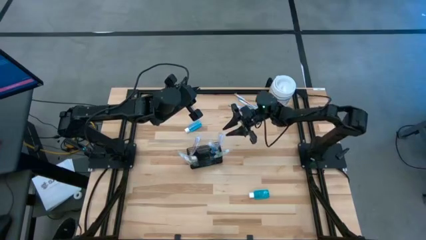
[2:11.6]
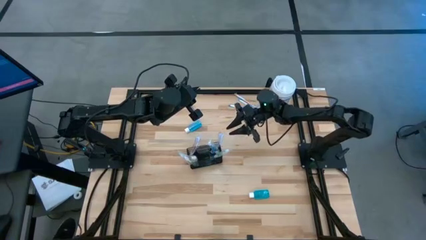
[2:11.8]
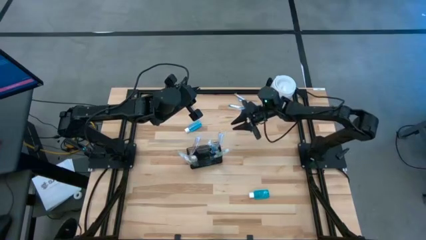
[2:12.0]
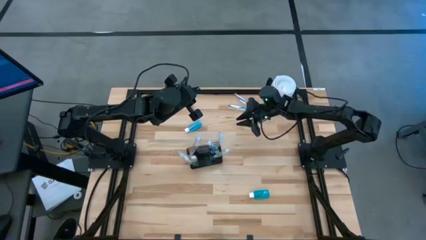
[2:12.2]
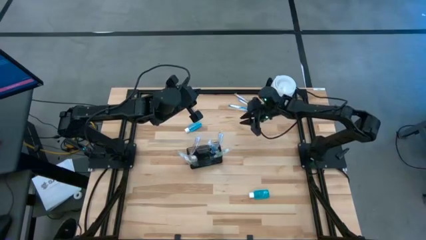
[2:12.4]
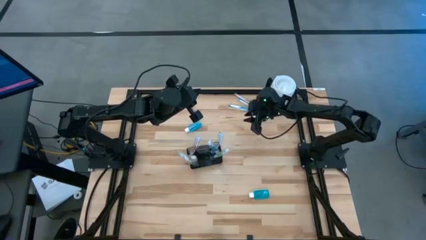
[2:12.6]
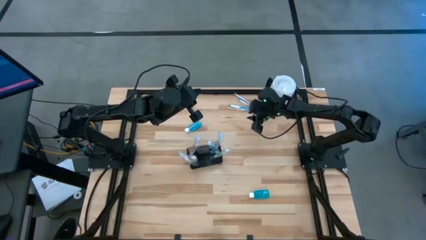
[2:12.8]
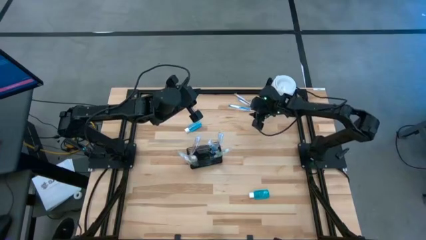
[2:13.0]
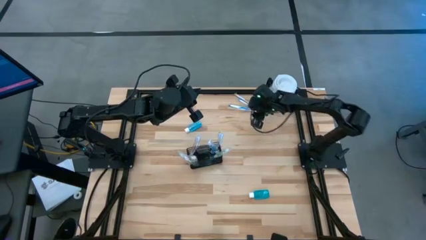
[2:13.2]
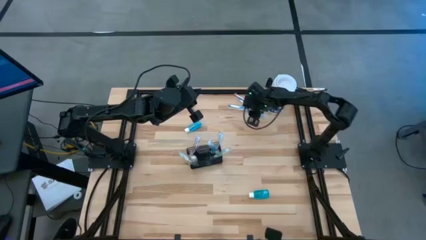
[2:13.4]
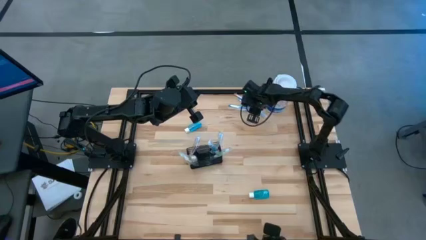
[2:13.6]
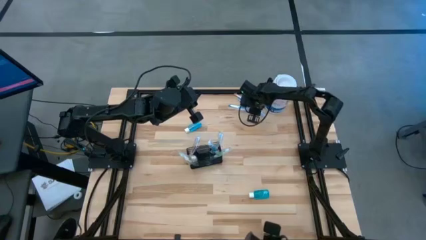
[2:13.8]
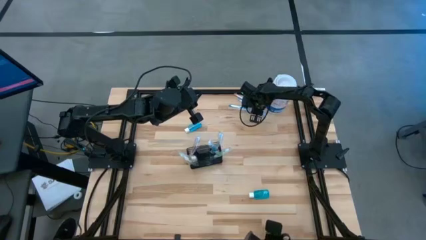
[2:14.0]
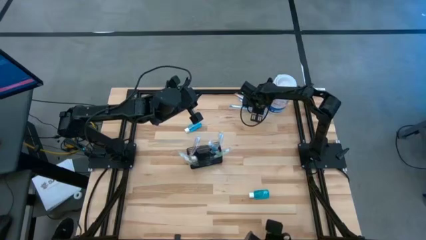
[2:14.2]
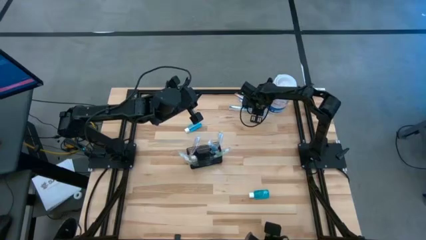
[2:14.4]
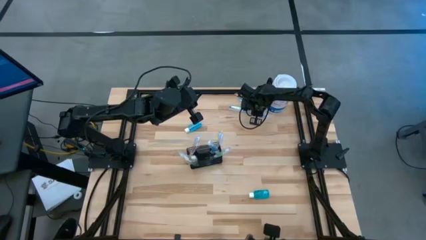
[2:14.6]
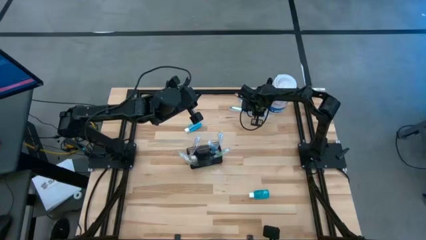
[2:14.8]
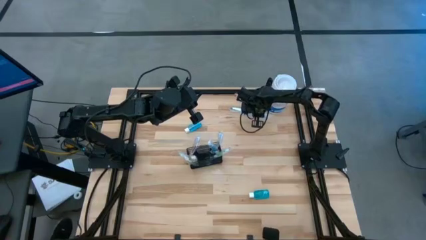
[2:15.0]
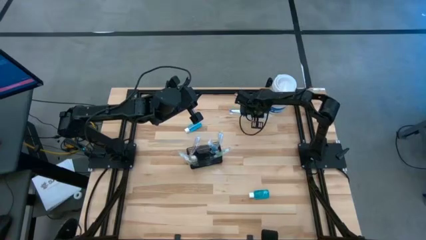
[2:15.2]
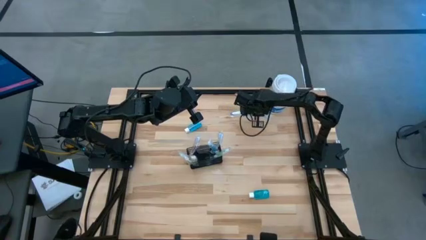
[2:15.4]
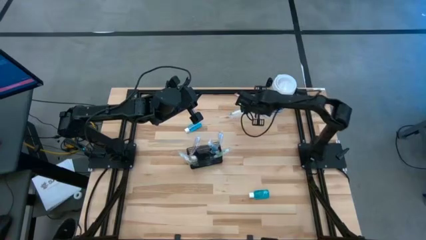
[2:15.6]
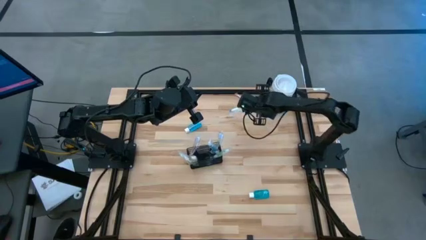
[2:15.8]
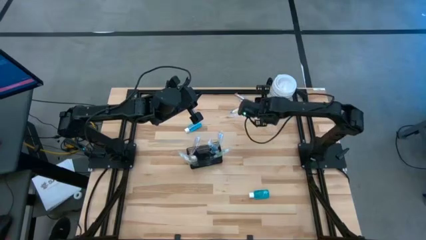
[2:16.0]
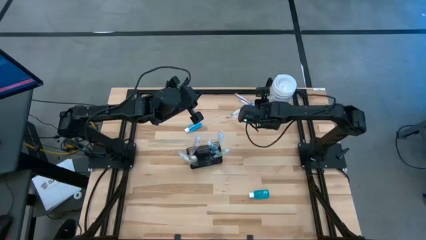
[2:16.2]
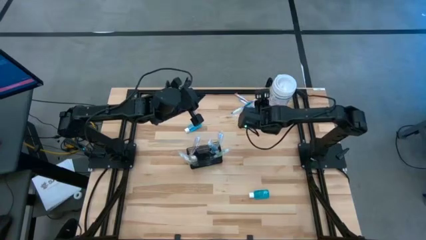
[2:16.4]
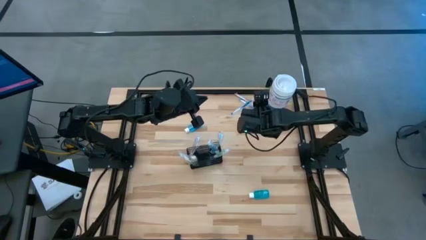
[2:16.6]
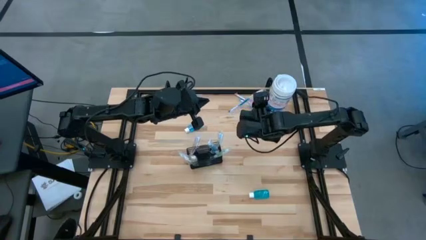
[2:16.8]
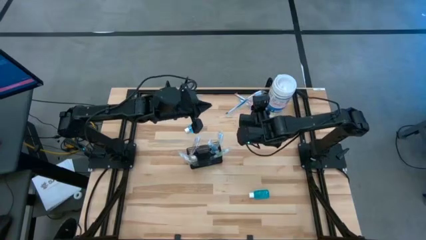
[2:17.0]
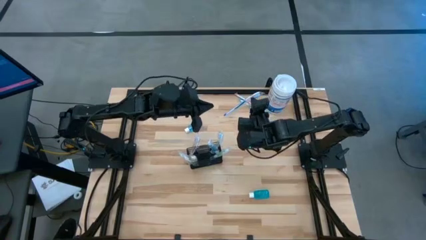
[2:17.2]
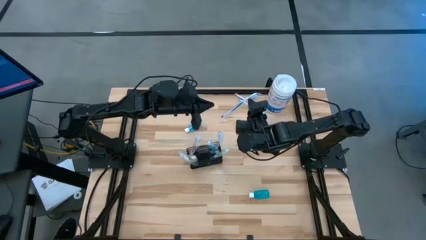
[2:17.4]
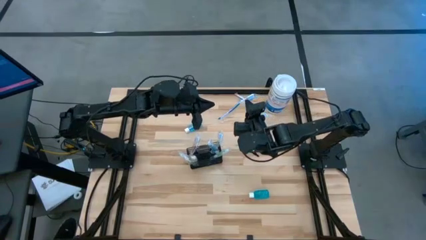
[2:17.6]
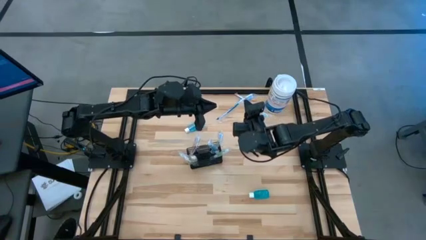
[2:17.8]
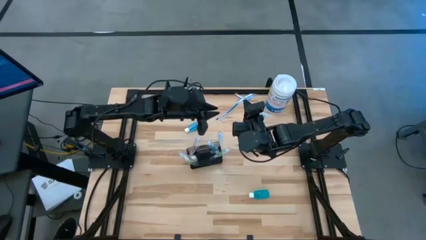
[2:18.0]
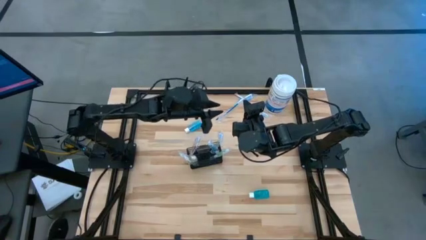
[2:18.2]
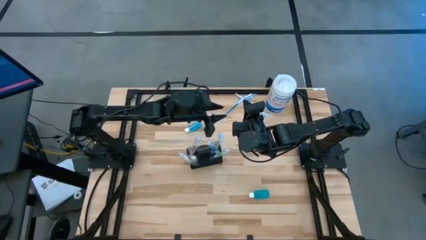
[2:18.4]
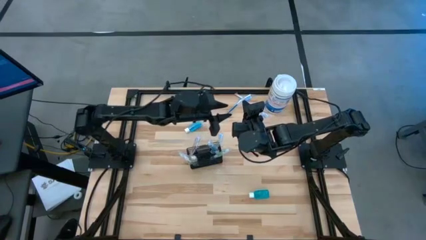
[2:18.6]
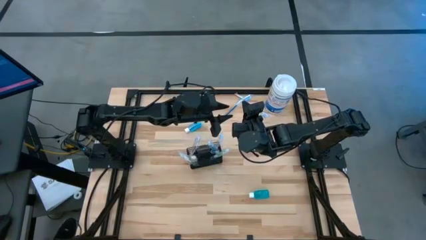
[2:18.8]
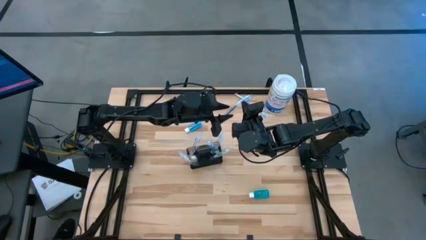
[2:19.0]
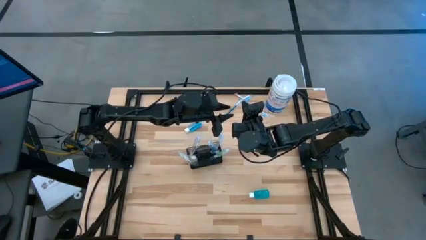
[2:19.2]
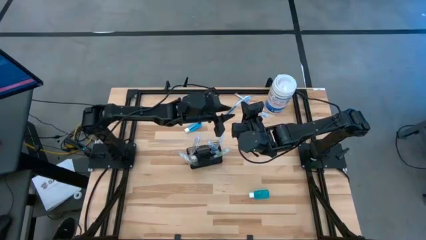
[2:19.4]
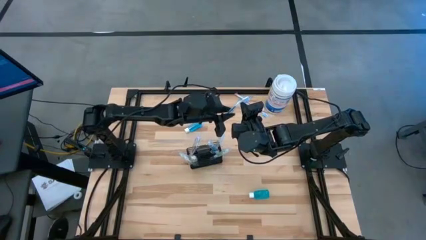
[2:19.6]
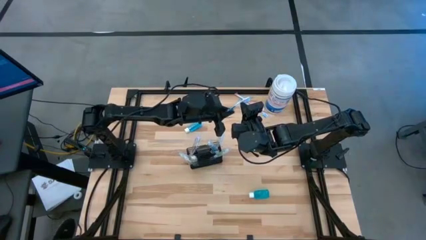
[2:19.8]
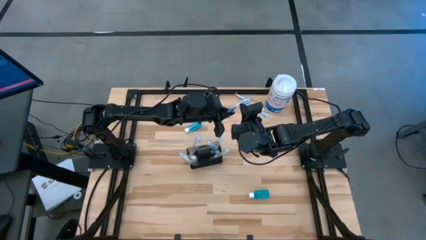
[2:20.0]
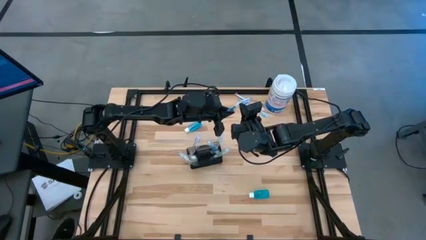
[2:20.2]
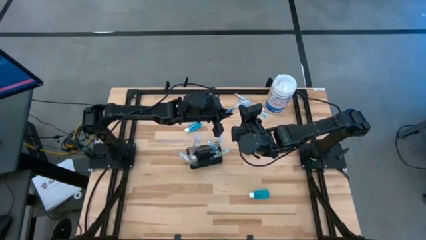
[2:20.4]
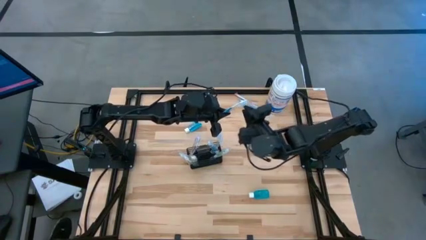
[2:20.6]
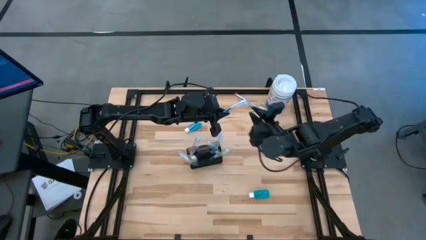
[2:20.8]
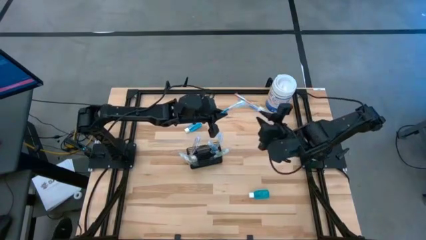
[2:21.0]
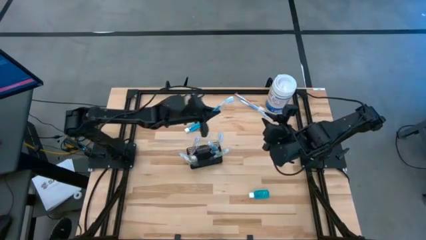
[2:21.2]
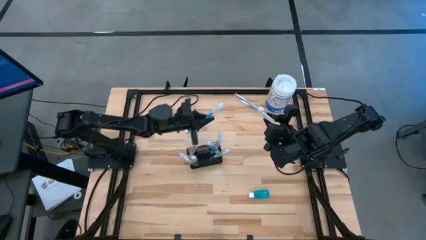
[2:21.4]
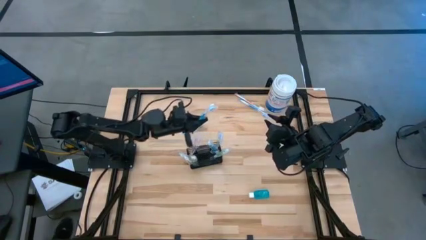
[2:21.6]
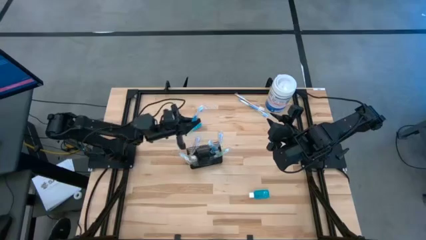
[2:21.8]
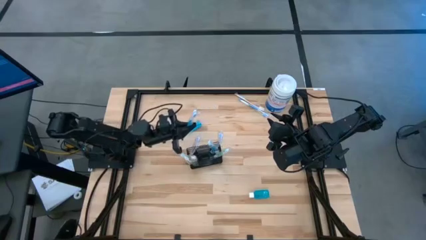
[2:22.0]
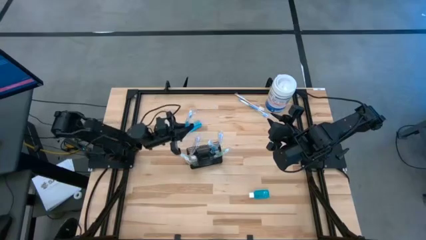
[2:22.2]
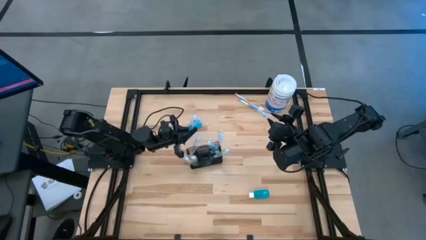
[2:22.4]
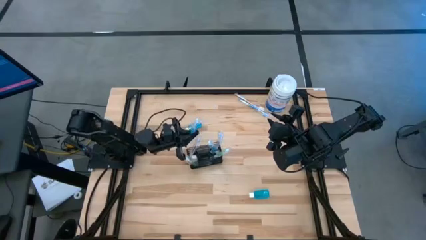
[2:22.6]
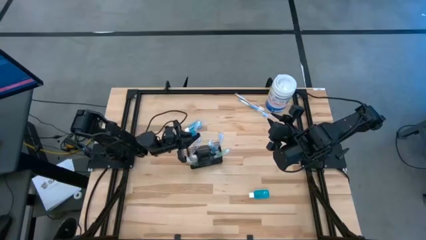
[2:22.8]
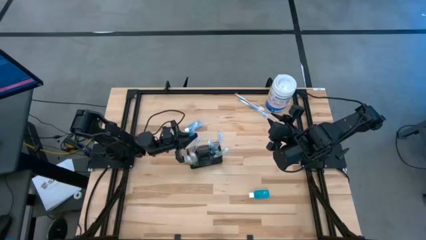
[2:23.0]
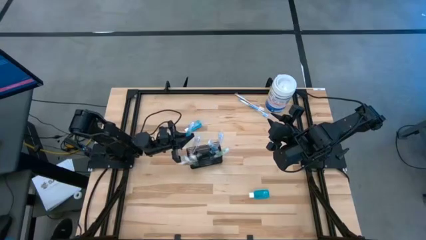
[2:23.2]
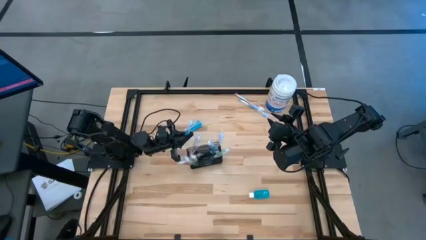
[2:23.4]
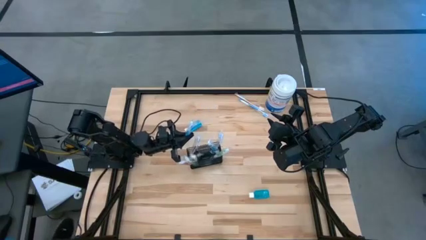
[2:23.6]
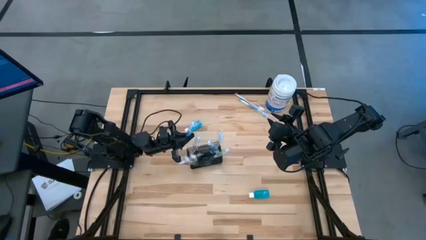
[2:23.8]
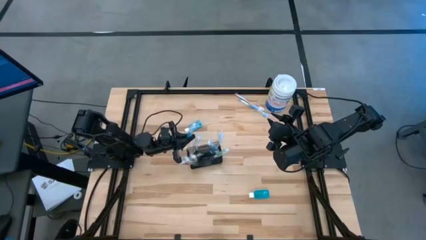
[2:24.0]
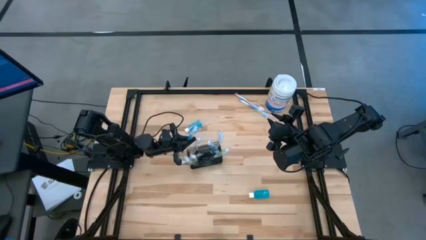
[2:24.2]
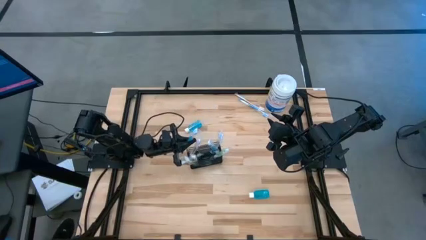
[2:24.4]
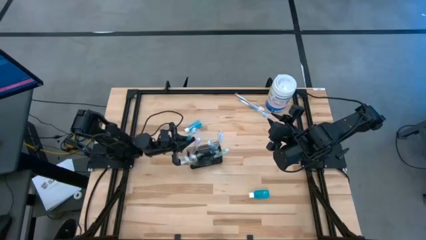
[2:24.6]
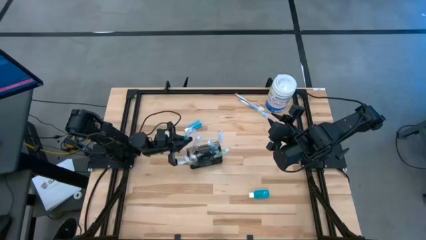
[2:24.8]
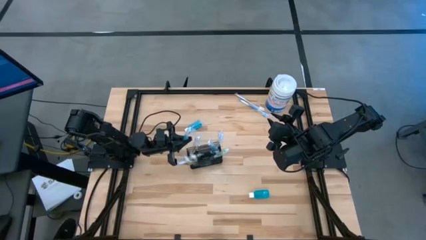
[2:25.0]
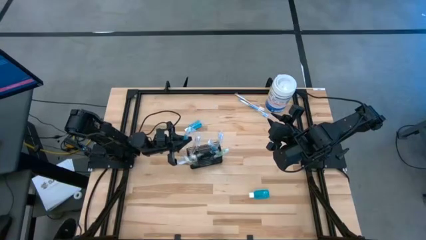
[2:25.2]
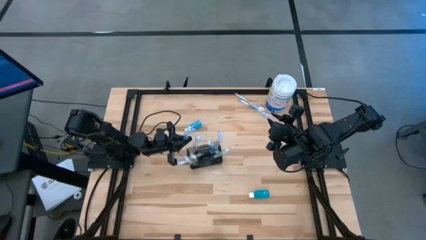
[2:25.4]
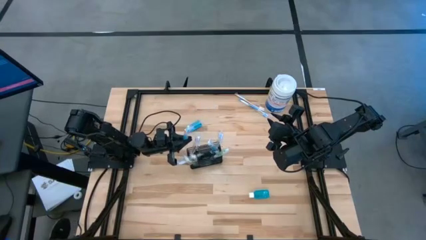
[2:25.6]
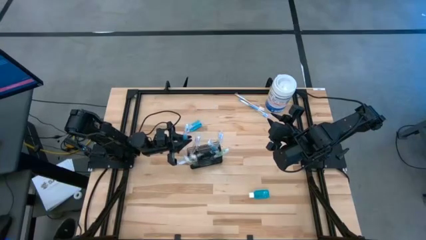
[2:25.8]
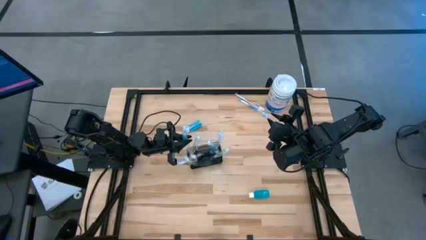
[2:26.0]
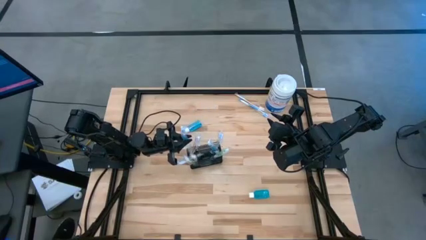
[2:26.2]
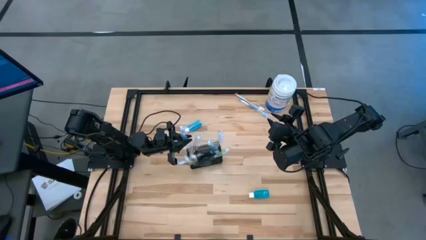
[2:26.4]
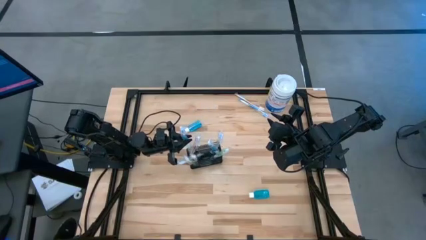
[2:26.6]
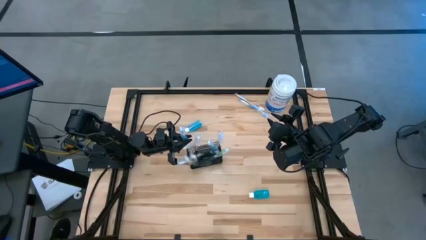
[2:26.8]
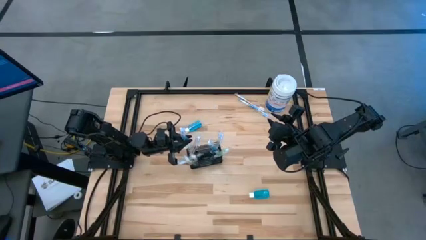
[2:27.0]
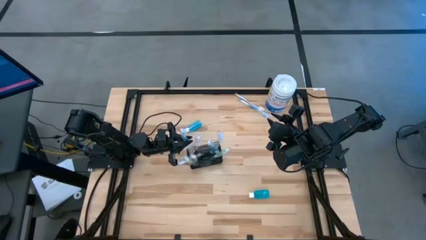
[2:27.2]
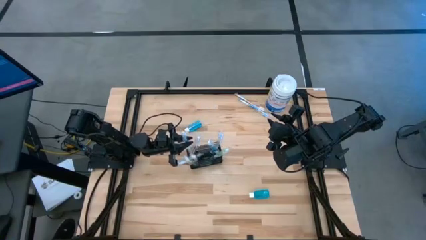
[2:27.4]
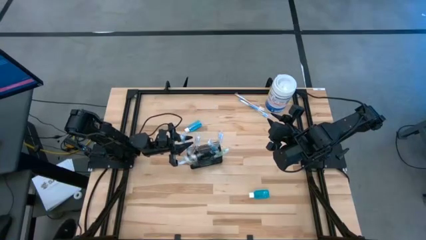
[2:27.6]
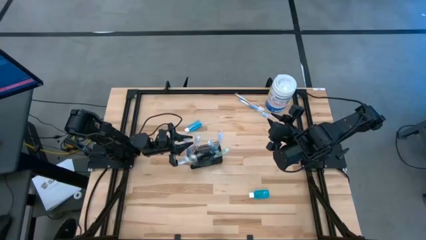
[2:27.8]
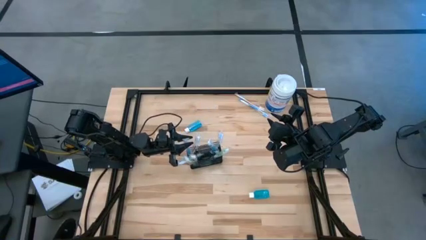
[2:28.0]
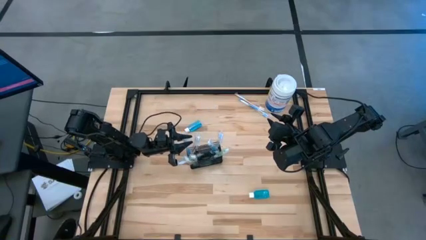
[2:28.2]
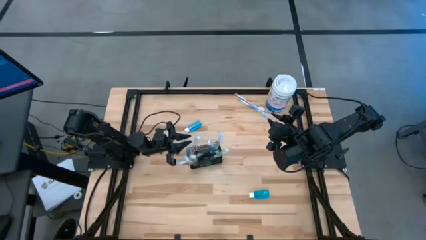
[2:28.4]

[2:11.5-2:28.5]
Task: Pick & Place toothbrushing station
Put the blue toothbrush into the wire organizer
